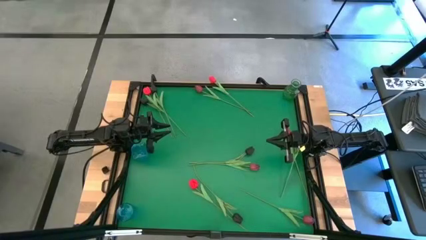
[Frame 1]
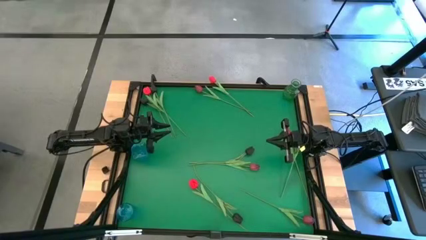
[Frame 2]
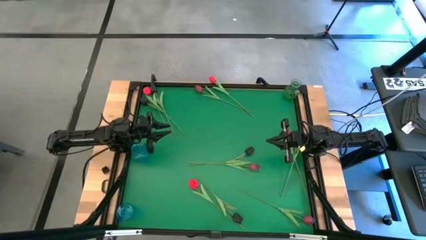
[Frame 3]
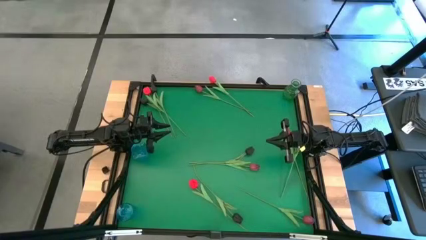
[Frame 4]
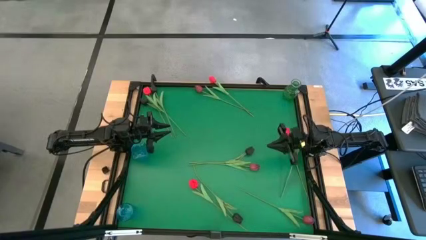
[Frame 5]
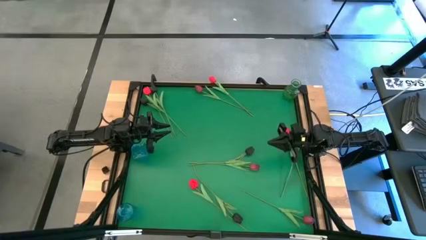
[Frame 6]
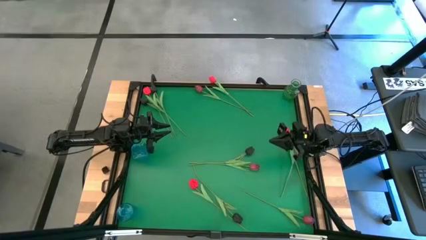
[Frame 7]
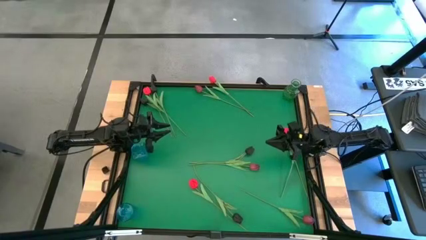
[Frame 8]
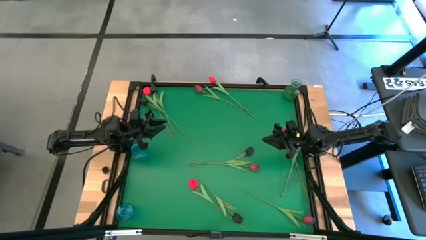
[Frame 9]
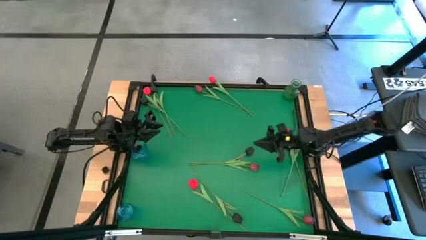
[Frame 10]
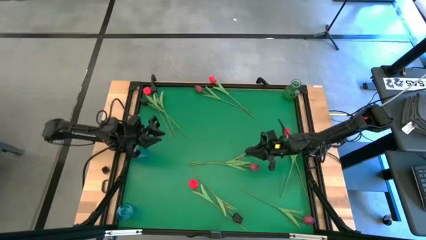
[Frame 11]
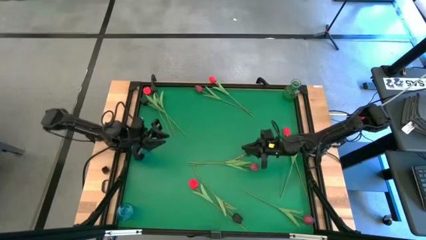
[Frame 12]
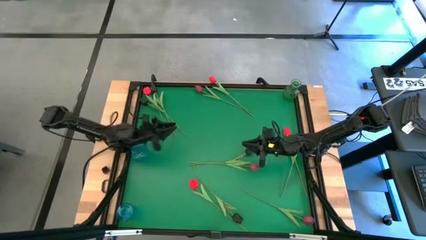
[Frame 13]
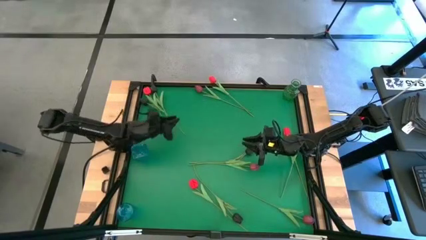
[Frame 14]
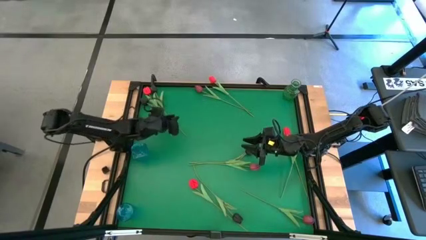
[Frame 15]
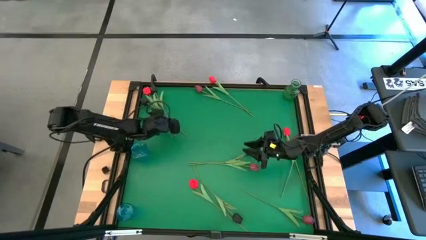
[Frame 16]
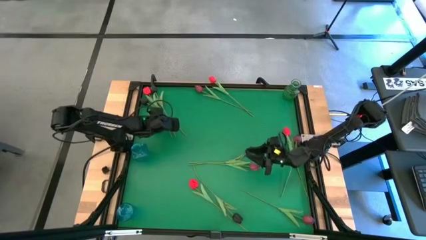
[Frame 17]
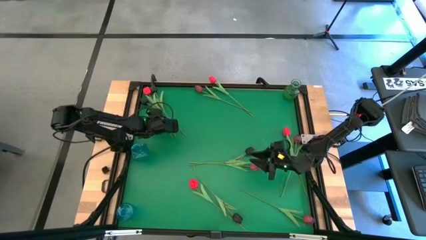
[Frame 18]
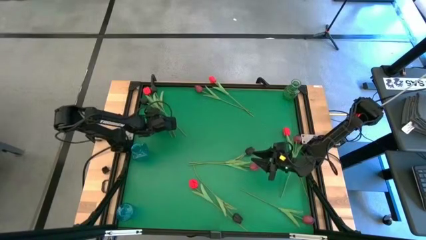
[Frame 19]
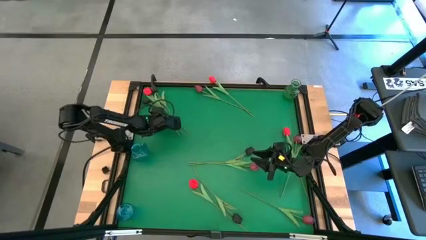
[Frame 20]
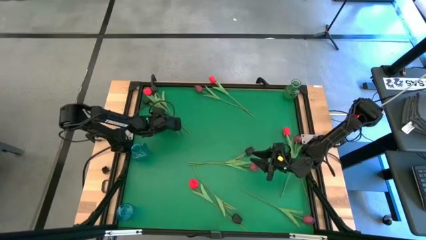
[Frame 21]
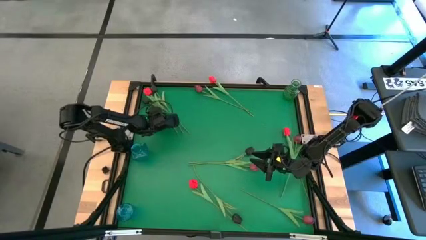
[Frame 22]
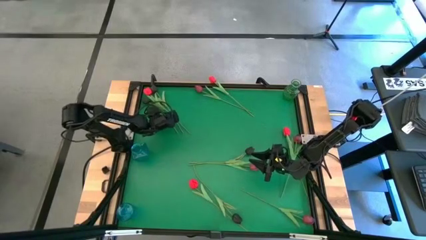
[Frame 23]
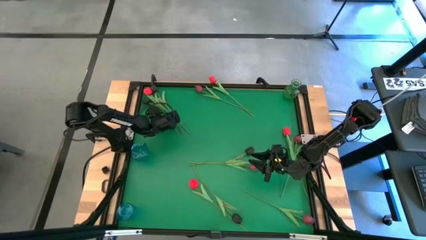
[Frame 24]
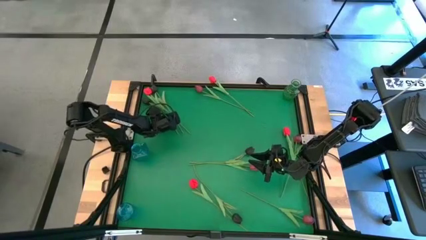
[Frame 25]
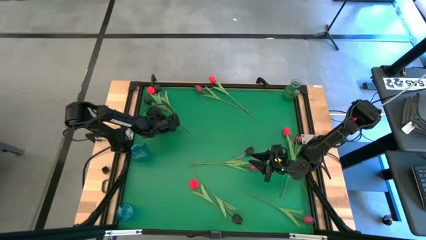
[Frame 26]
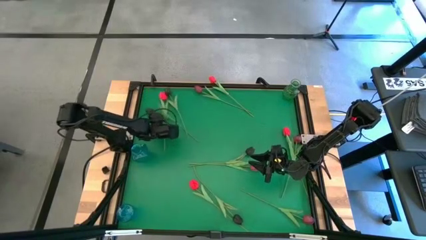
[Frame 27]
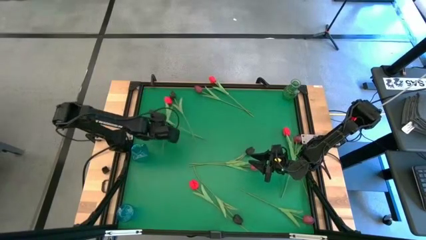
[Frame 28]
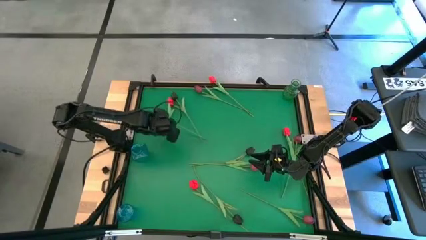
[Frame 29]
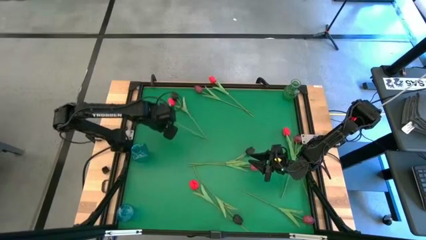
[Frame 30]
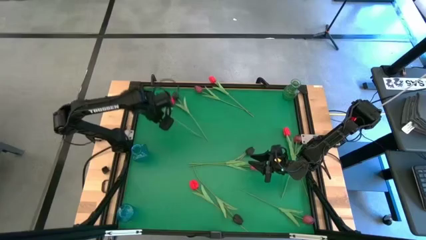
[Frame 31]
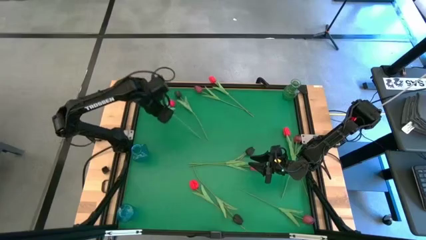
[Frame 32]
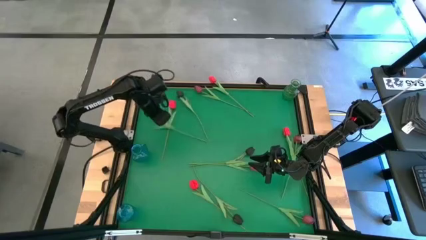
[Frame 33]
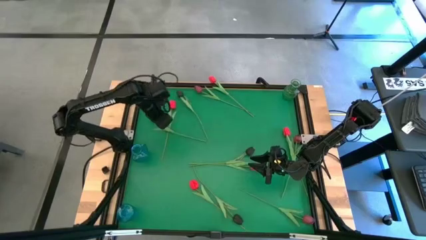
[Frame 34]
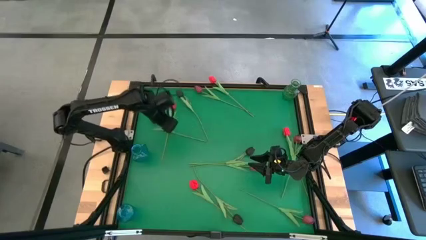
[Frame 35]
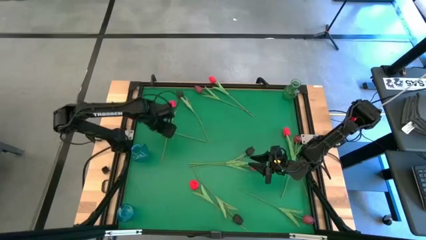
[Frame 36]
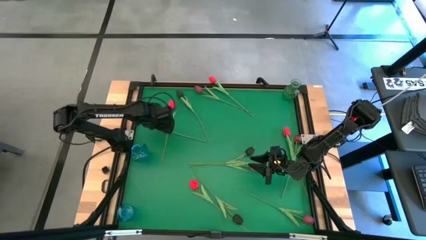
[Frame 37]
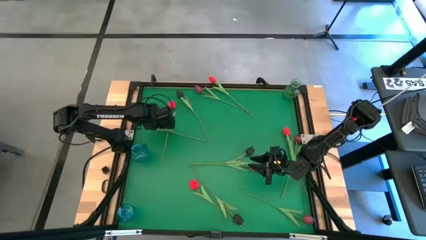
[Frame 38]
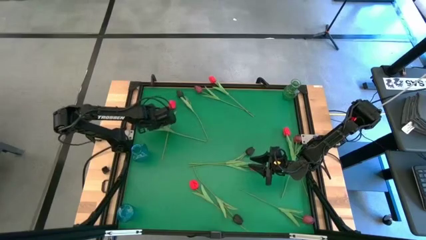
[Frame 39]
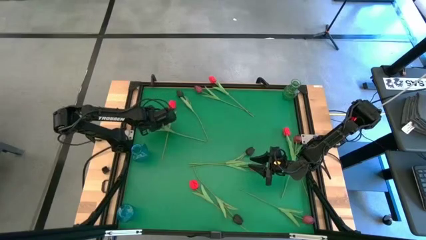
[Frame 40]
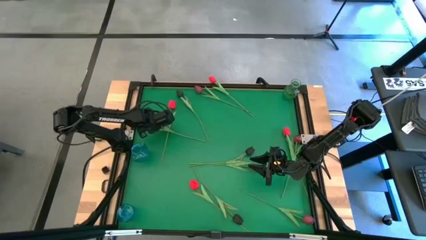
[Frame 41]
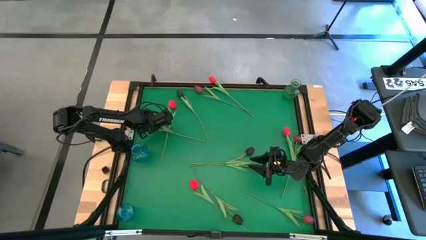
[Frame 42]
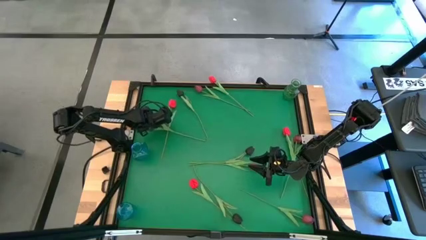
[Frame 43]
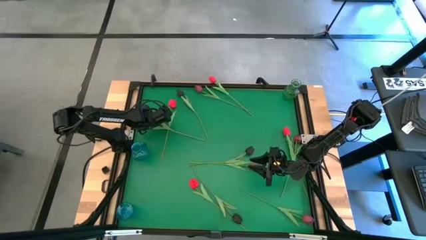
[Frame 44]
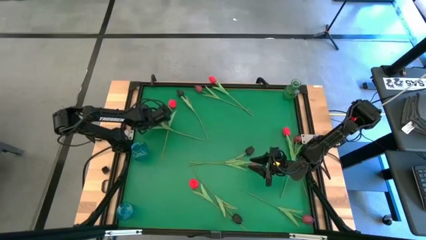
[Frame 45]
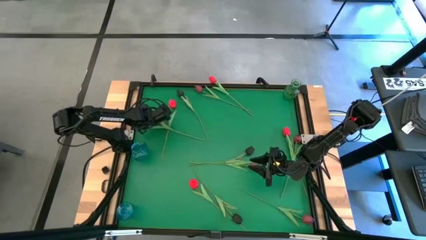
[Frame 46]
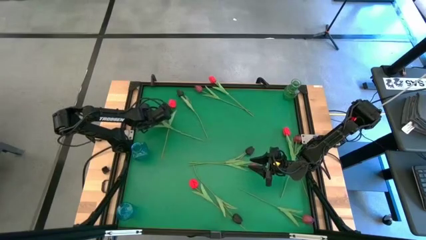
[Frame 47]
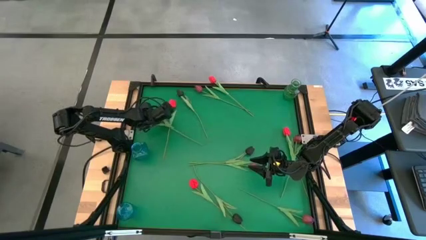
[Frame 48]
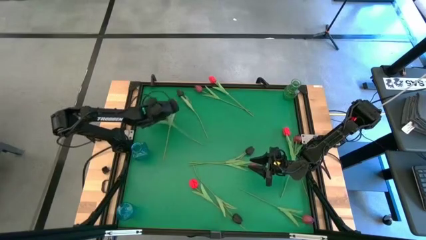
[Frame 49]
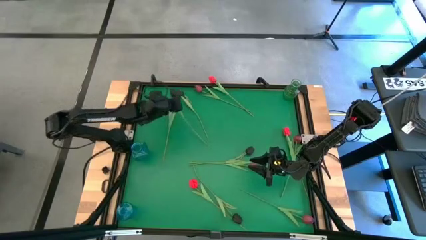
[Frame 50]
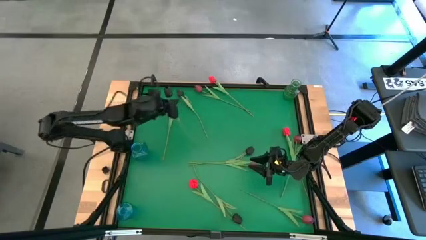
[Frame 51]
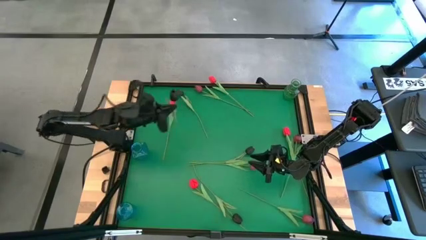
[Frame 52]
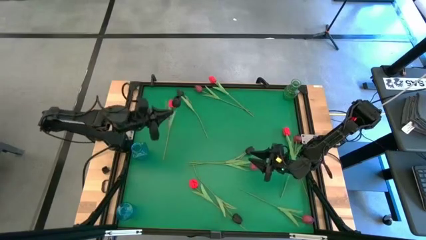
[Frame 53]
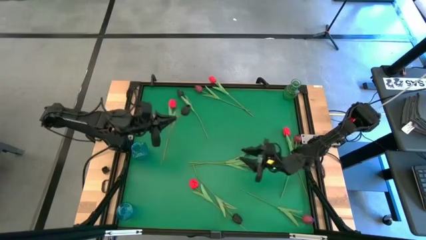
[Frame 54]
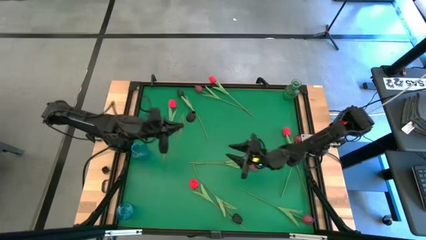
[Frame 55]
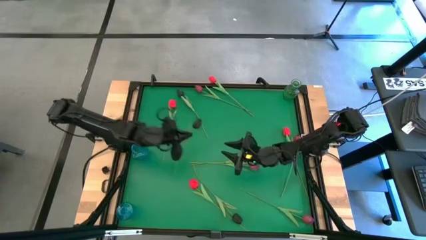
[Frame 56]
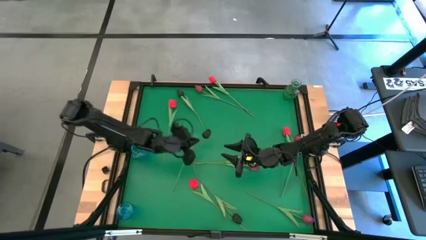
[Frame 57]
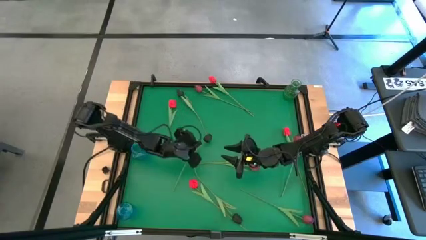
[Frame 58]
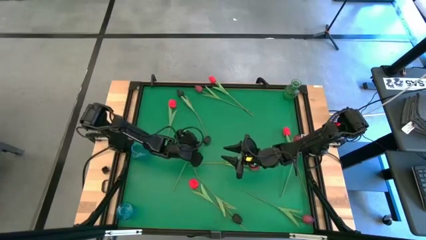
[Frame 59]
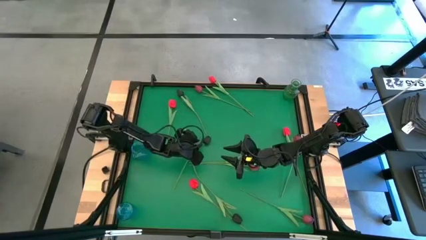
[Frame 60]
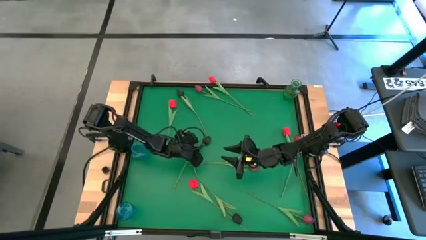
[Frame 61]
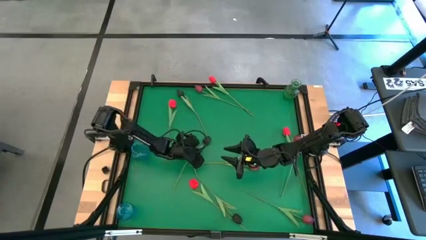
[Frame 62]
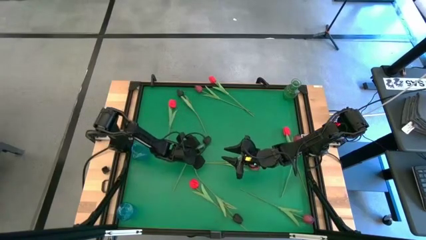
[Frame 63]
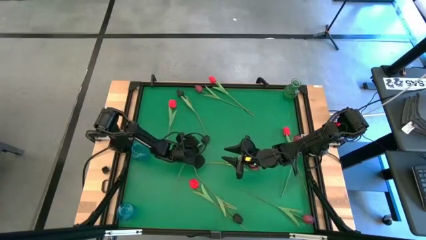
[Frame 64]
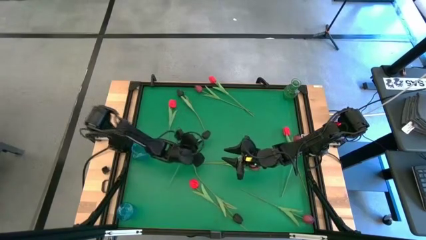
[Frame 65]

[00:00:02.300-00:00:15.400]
Task: Sort flowers into vase by color
Put the black tulip into the top blue vase
